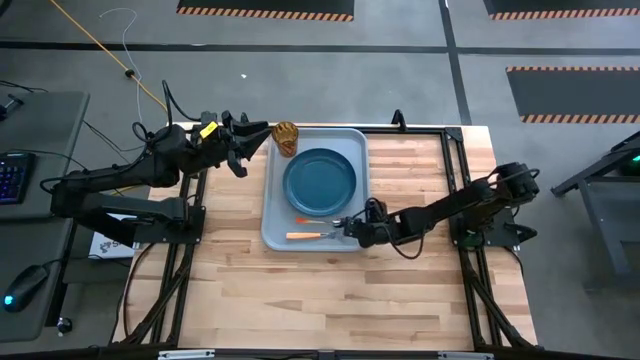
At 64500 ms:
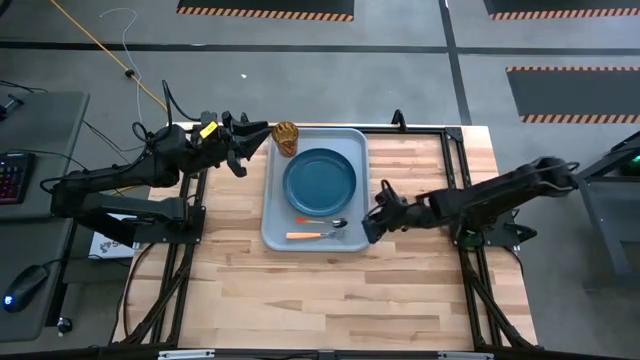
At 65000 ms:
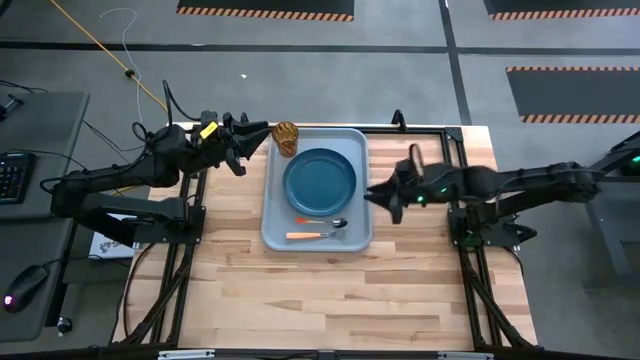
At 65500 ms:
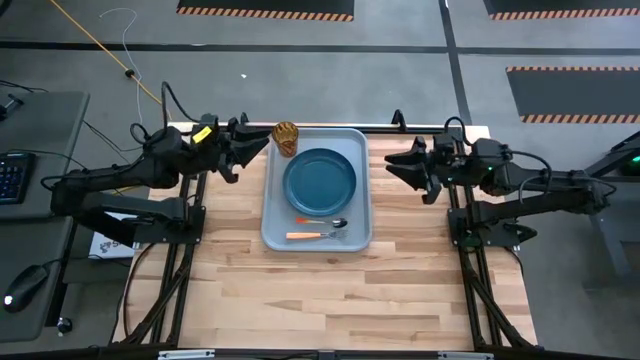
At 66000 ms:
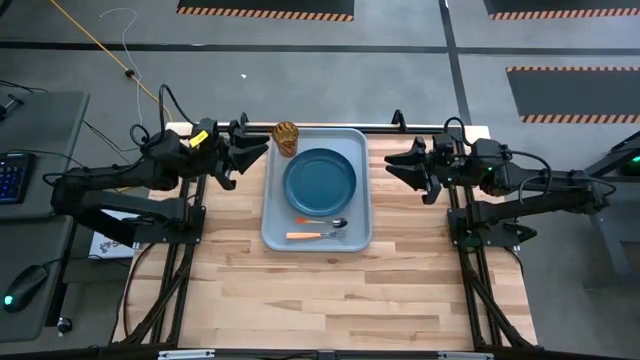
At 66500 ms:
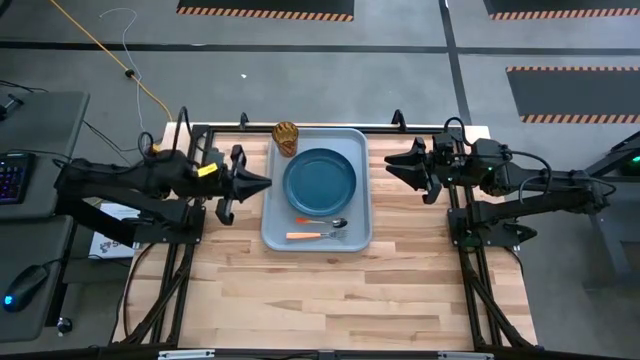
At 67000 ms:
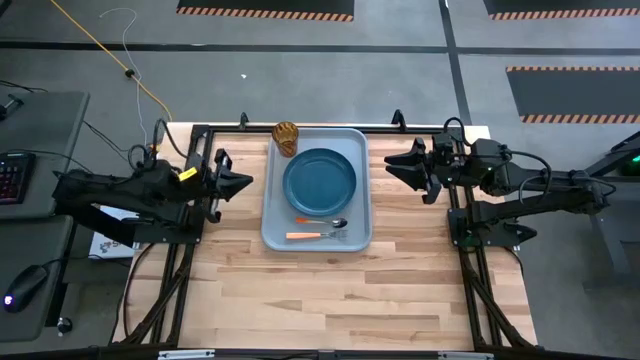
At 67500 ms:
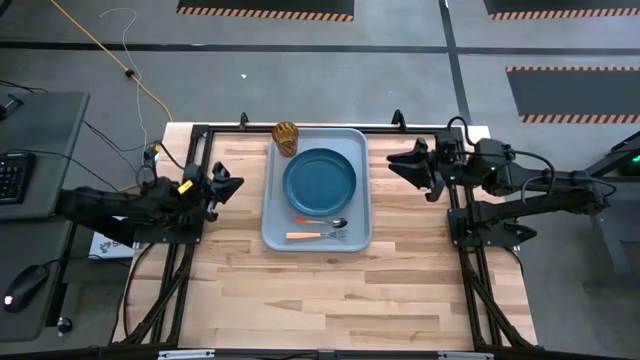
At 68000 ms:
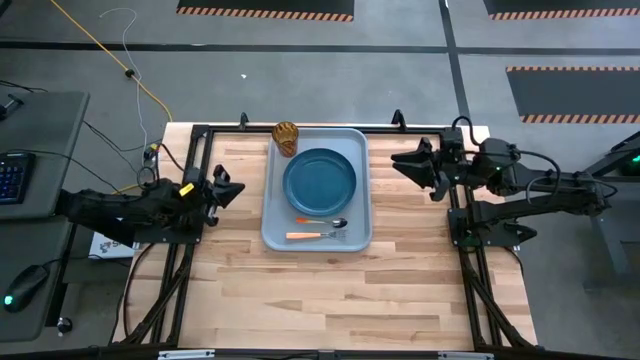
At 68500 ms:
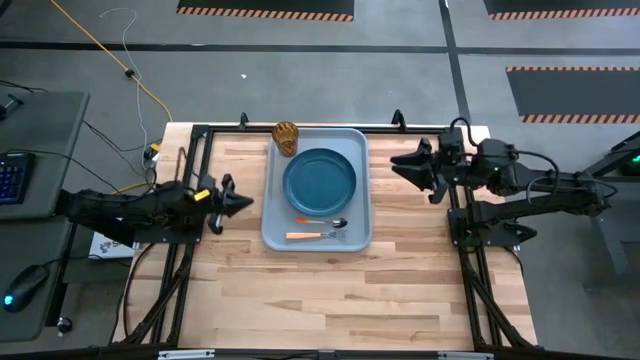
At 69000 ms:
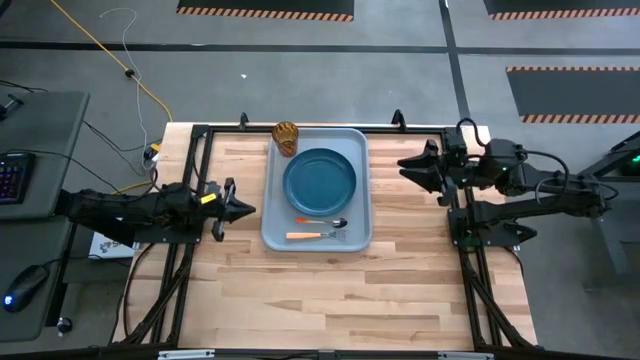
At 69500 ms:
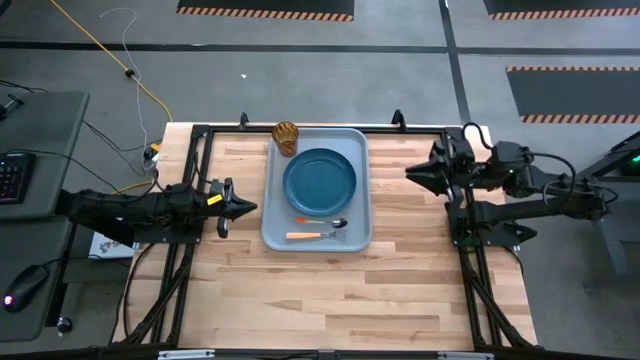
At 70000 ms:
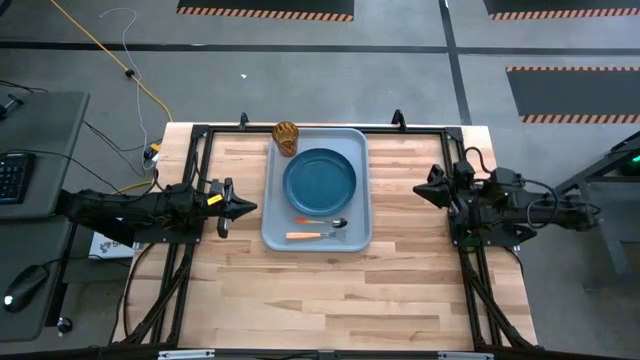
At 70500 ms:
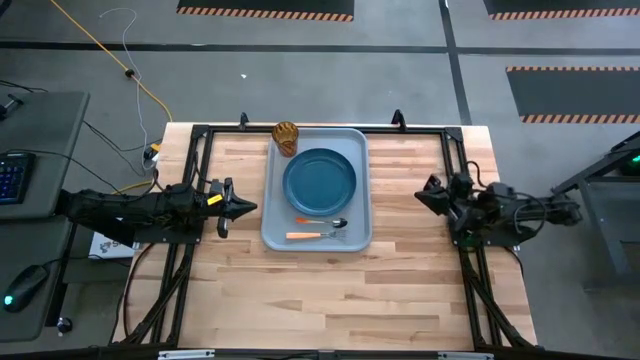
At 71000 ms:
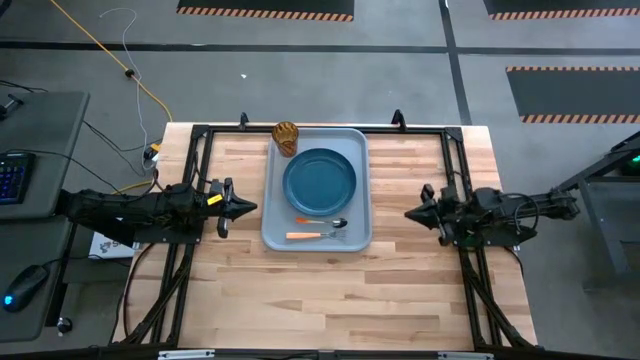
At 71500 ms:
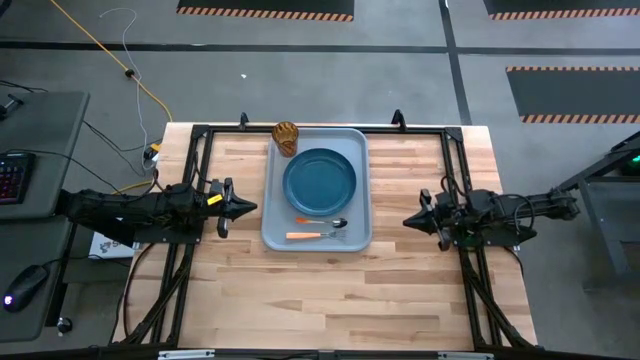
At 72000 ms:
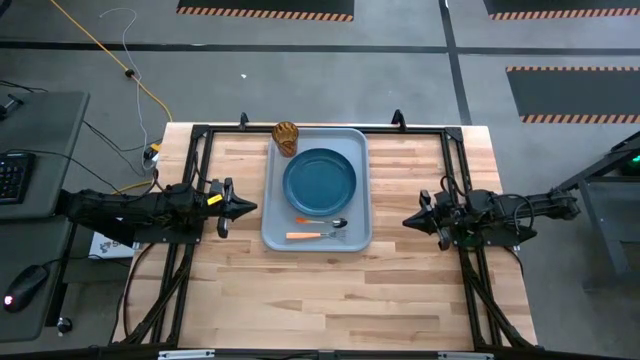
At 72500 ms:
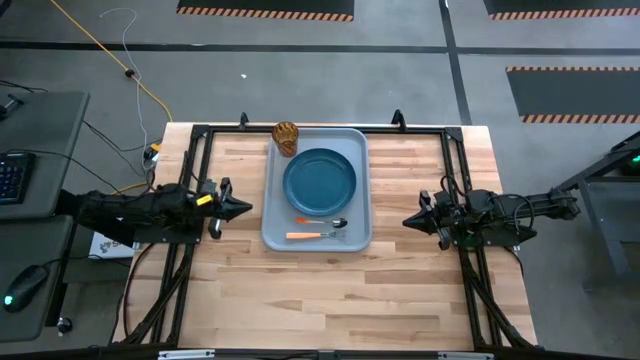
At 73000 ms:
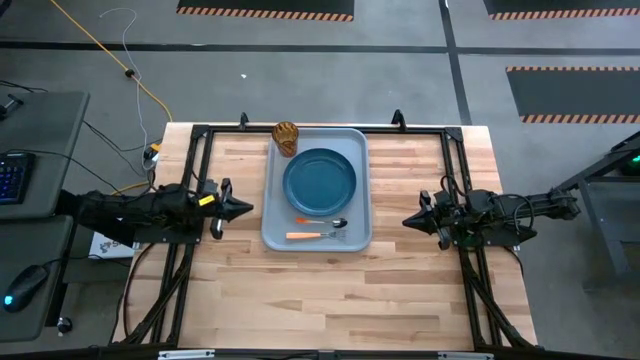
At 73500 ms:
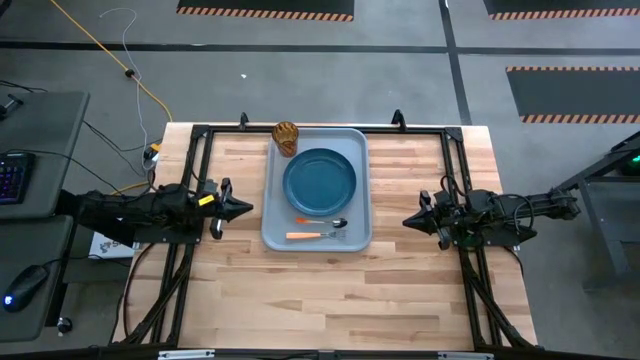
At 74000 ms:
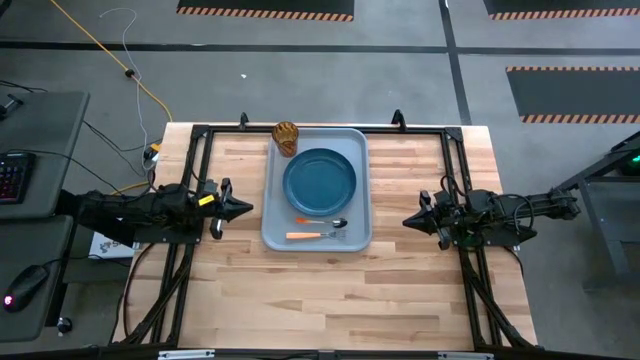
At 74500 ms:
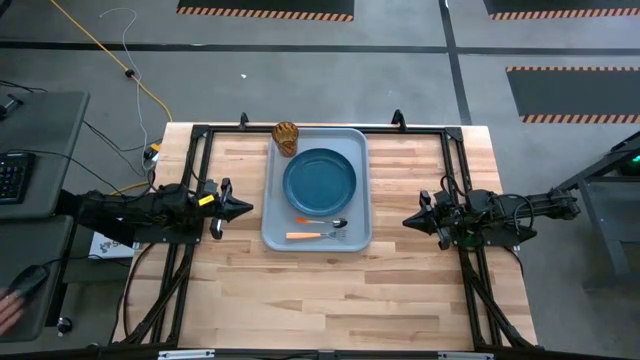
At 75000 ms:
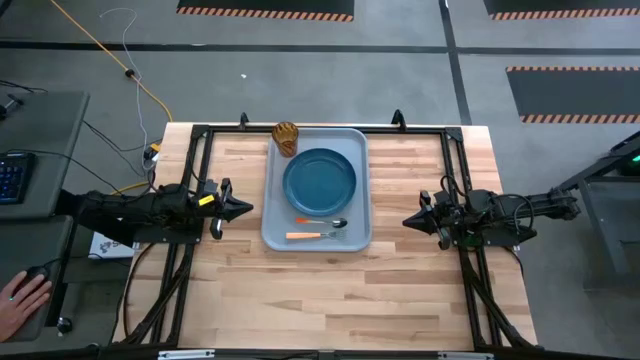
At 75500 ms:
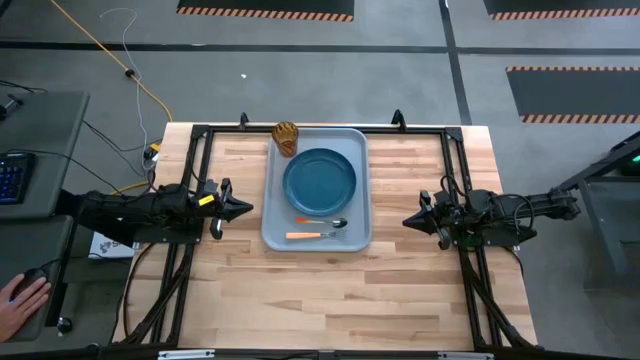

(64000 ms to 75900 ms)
Task: Pick and place plate/cup/fork/spoon on tray
Return to Home Position

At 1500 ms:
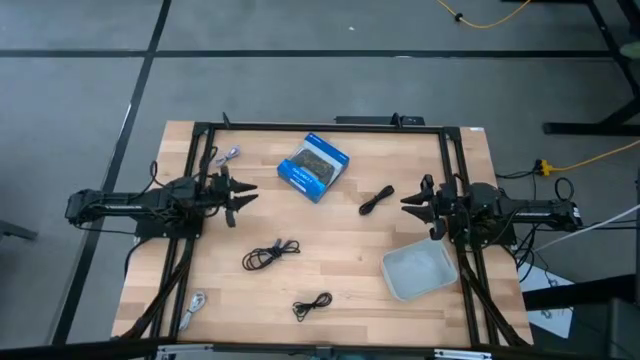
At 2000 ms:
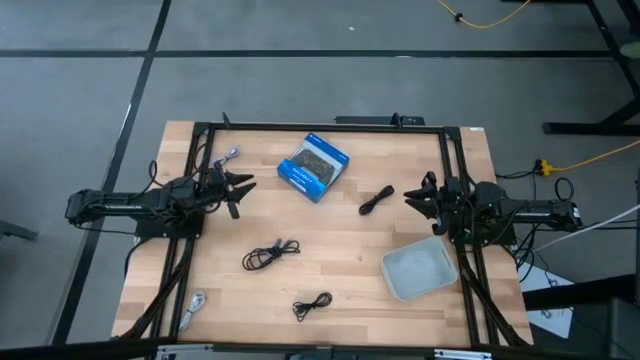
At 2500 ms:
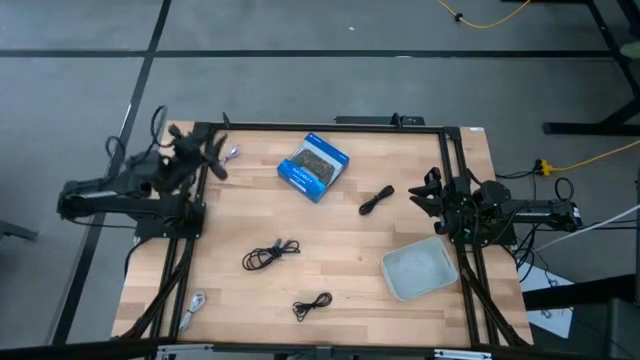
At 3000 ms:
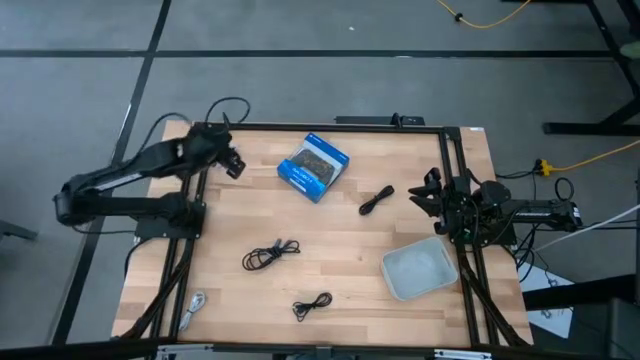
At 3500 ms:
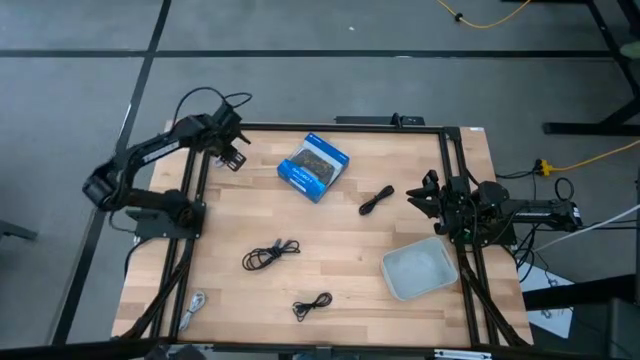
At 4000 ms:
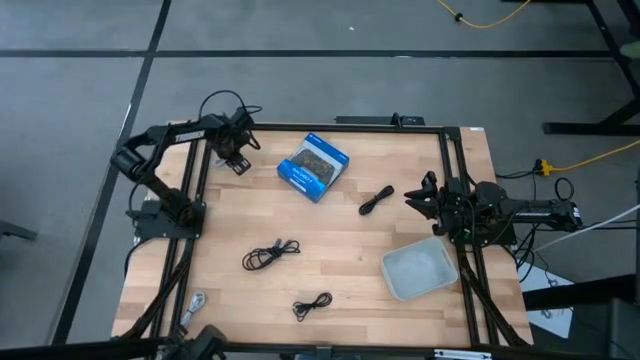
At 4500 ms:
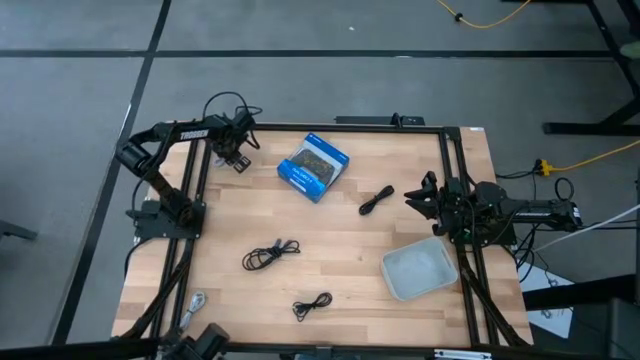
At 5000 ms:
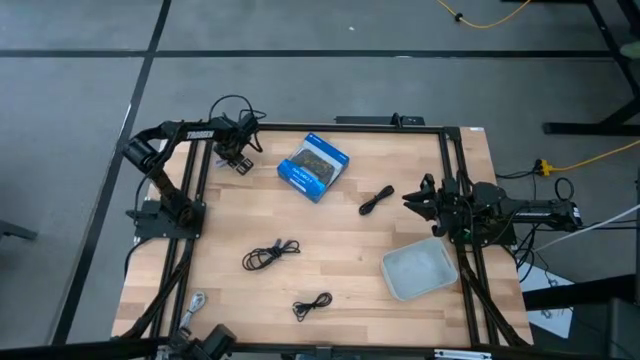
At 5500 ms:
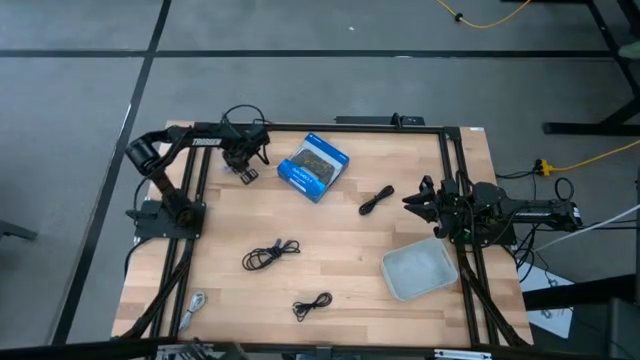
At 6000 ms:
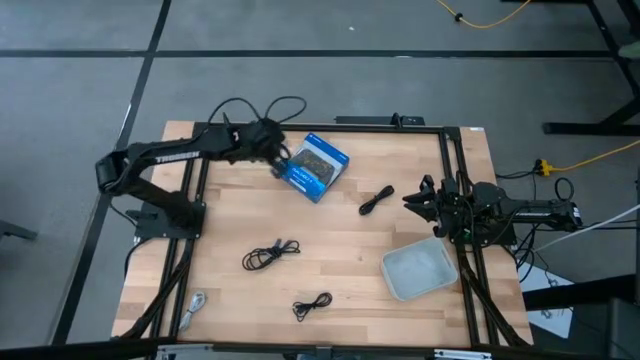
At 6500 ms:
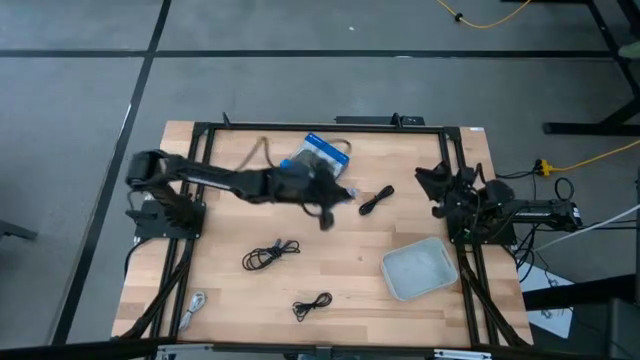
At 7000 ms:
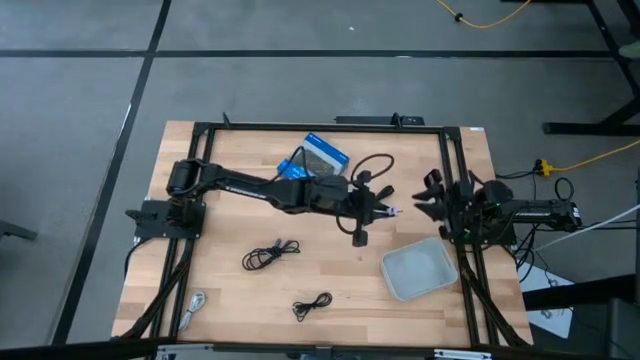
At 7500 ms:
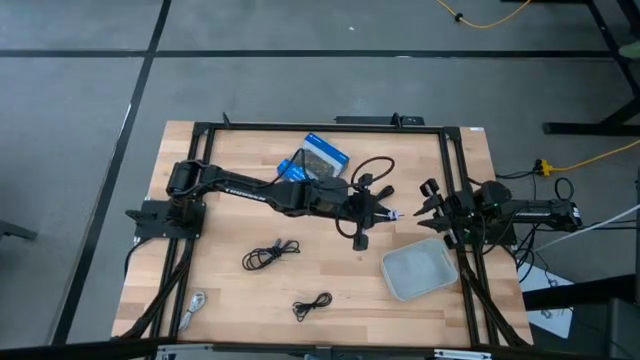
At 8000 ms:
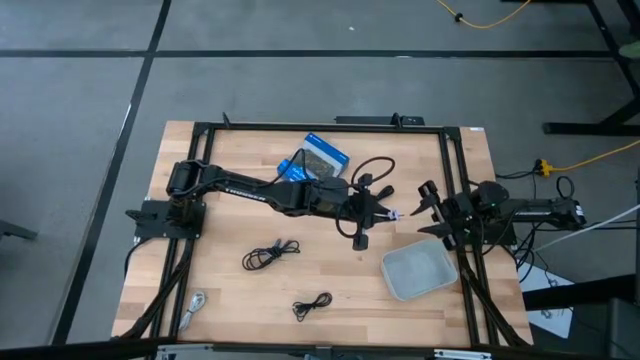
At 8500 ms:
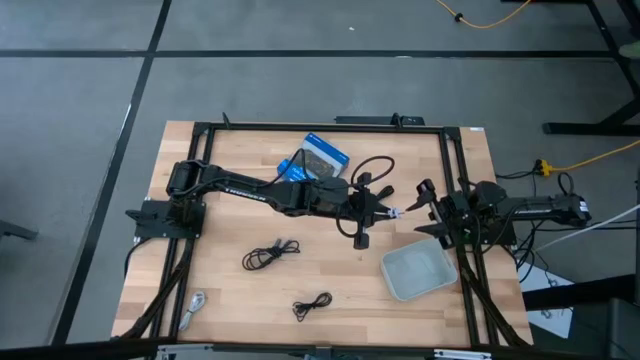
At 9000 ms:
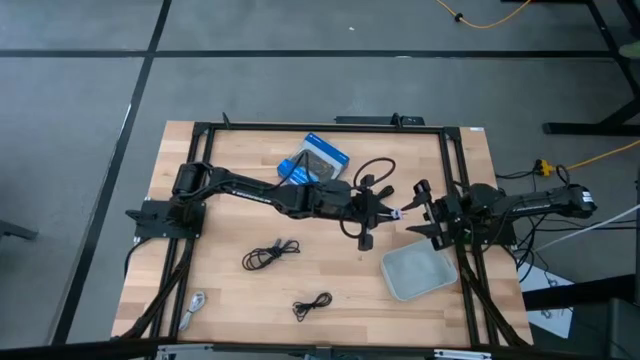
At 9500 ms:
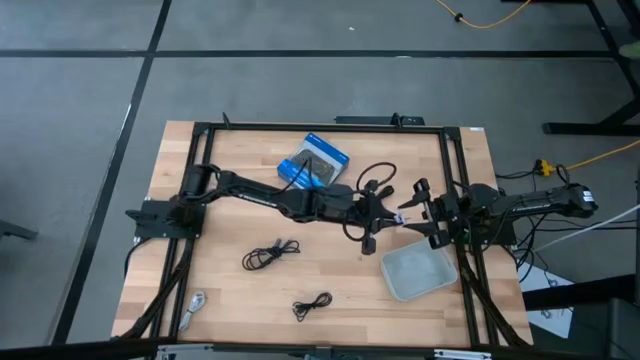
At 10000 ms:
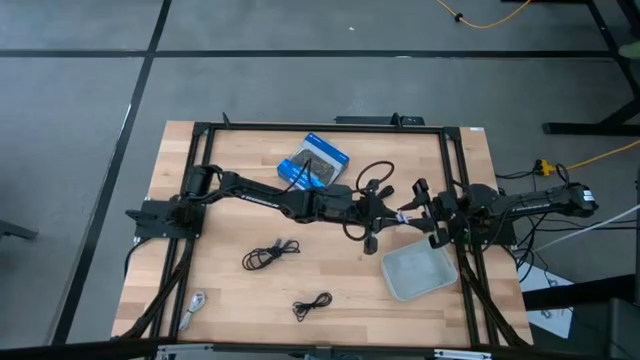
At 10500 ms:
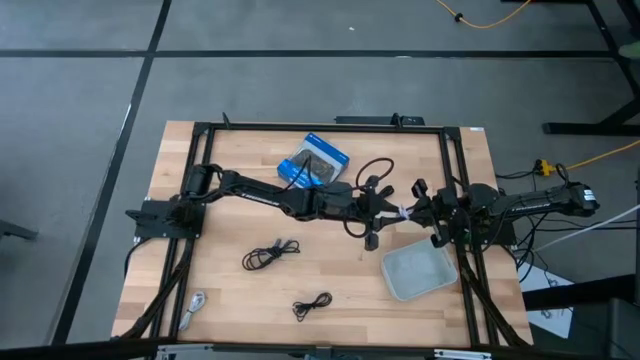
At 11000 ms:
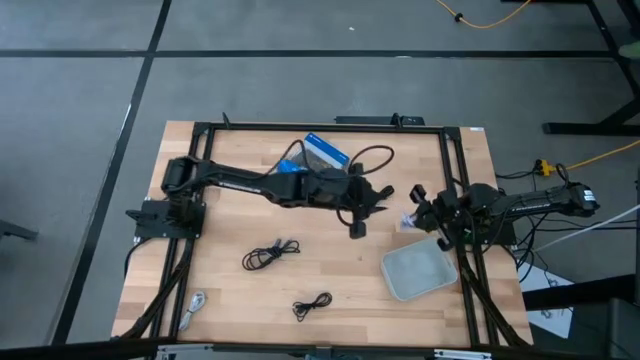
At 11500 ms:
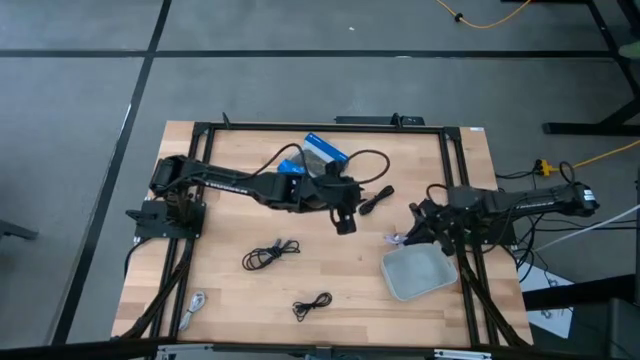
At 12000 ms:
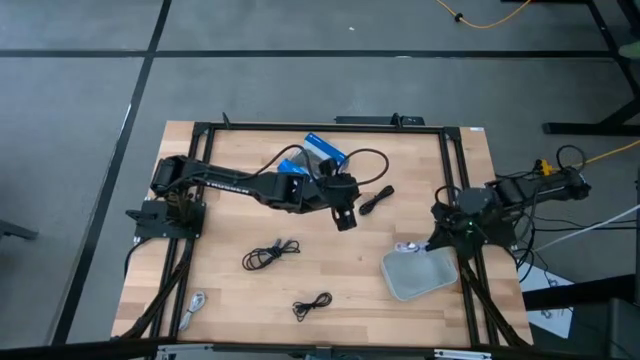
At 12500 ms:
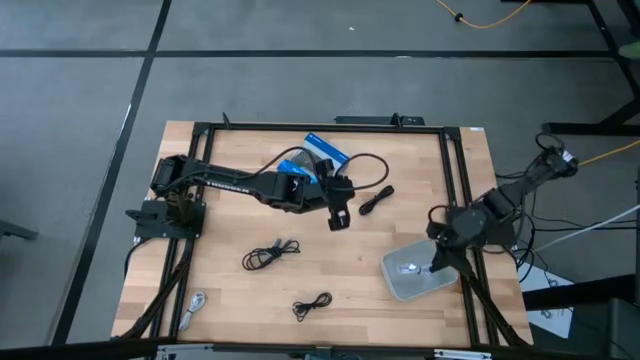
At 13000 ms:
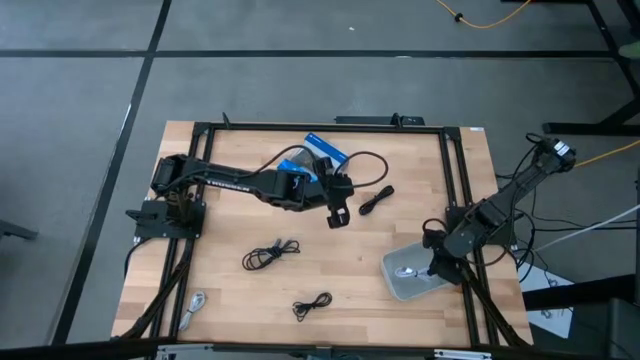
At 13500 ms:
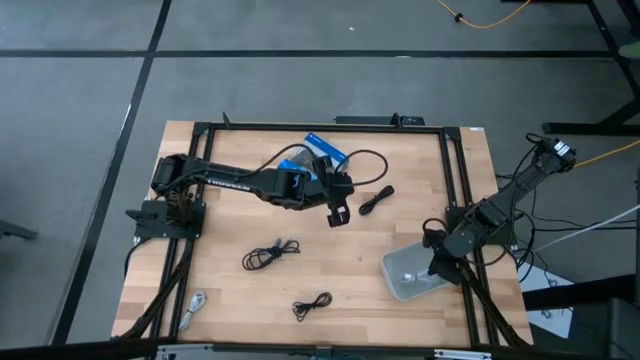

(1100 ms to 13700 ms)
Task: Pick and place USB-C Cables
Put the gray charger cable into the gray bin
